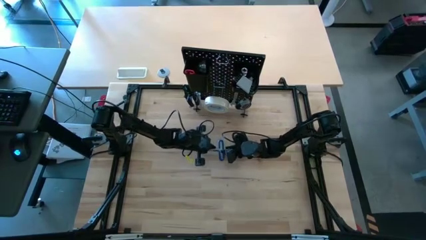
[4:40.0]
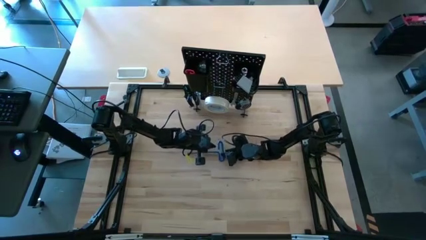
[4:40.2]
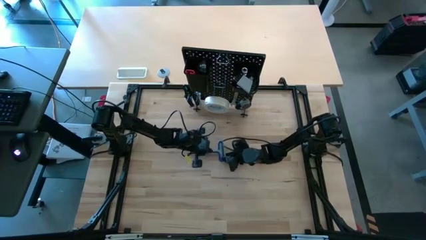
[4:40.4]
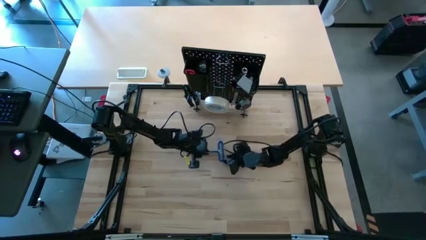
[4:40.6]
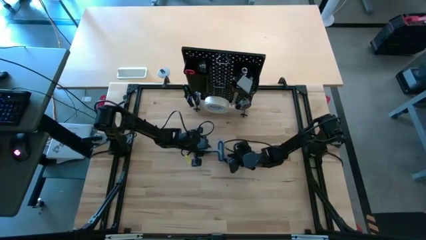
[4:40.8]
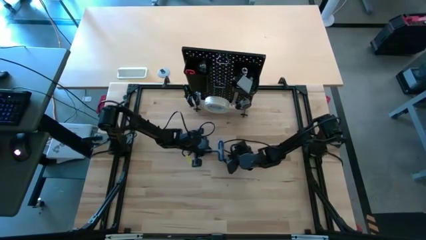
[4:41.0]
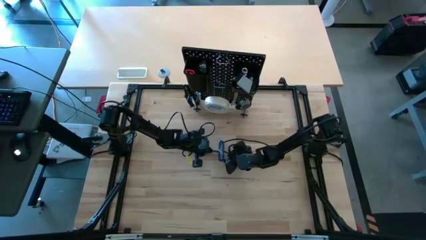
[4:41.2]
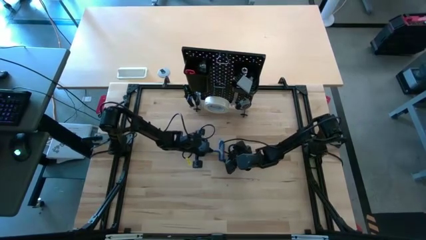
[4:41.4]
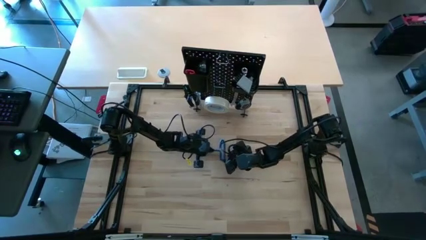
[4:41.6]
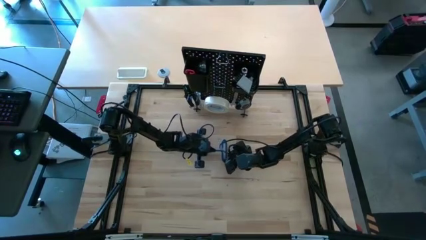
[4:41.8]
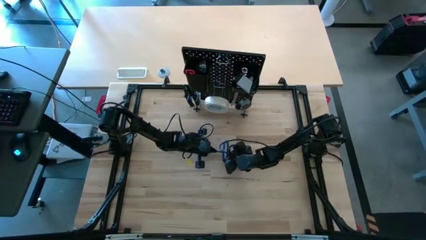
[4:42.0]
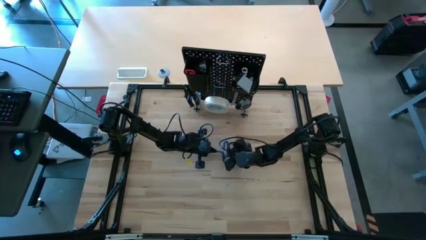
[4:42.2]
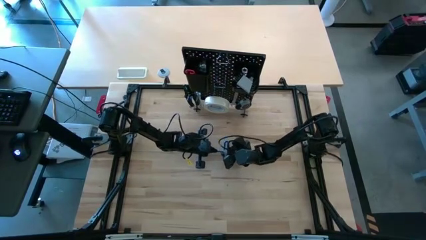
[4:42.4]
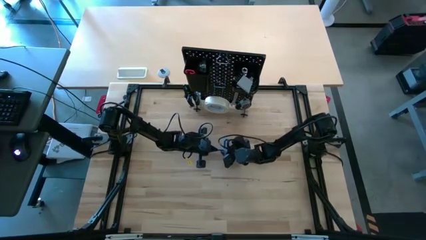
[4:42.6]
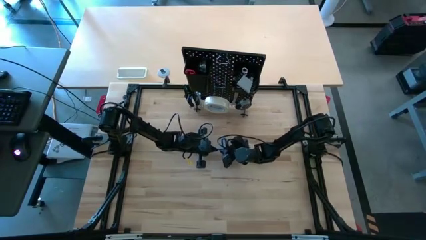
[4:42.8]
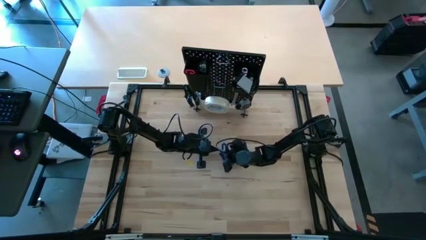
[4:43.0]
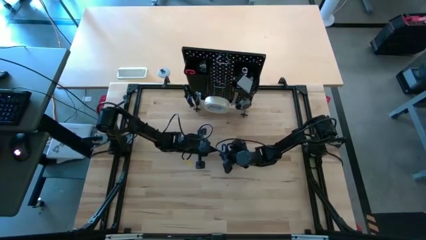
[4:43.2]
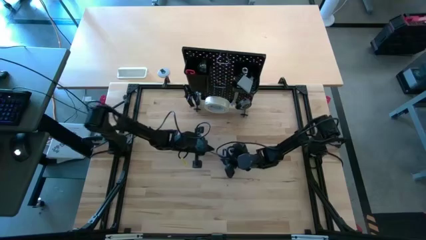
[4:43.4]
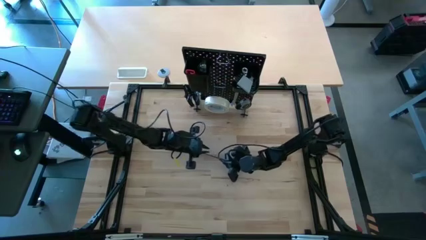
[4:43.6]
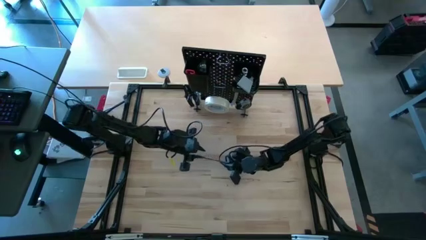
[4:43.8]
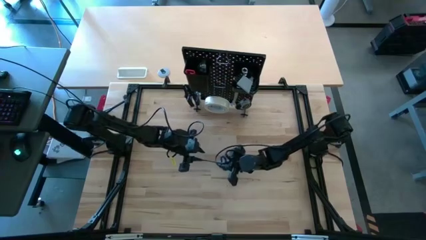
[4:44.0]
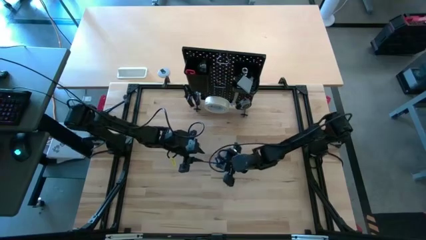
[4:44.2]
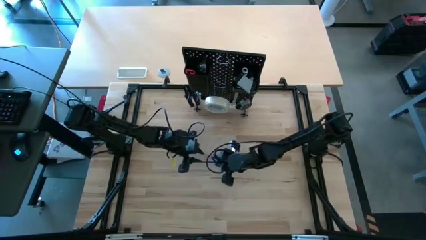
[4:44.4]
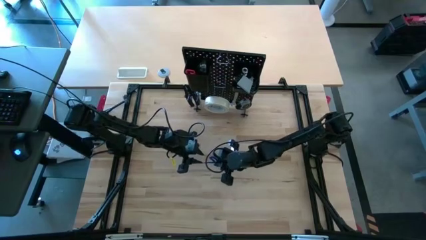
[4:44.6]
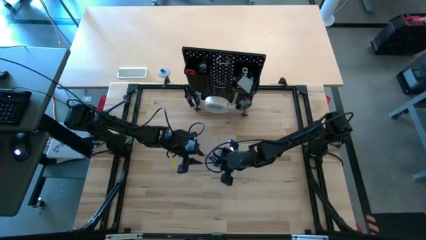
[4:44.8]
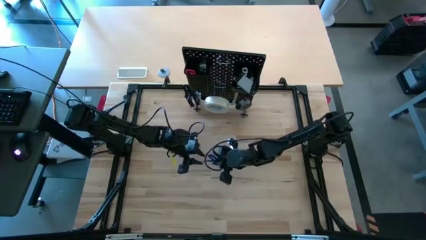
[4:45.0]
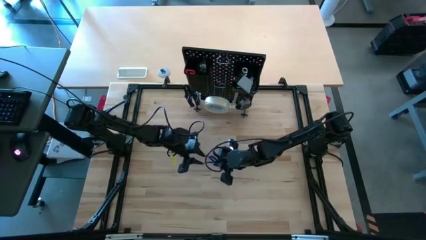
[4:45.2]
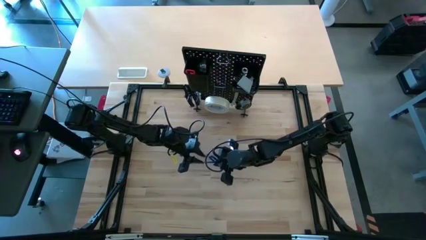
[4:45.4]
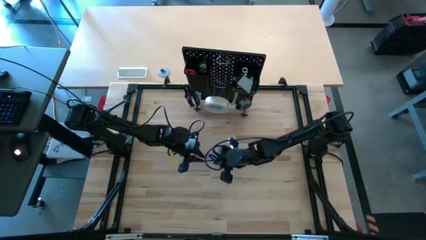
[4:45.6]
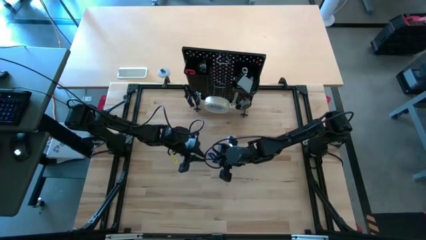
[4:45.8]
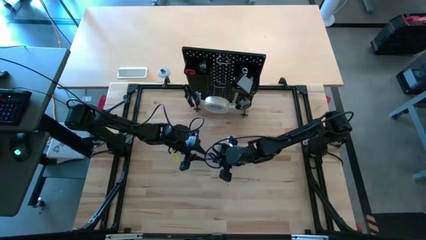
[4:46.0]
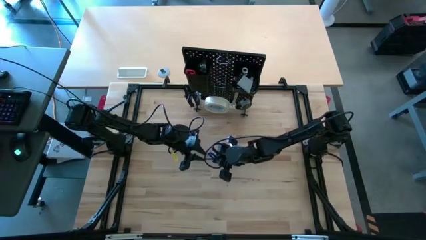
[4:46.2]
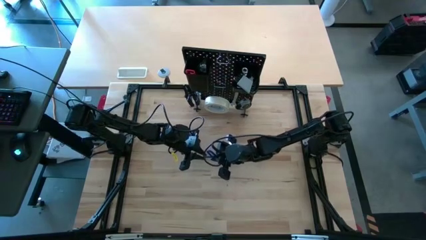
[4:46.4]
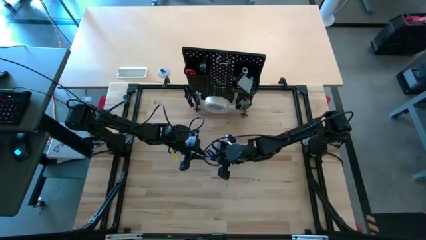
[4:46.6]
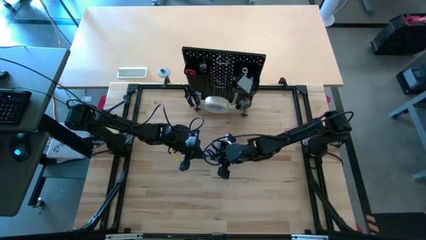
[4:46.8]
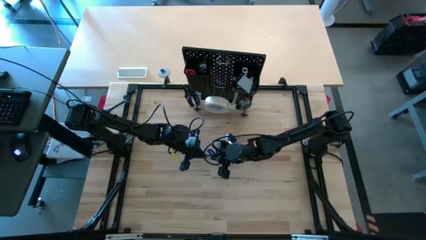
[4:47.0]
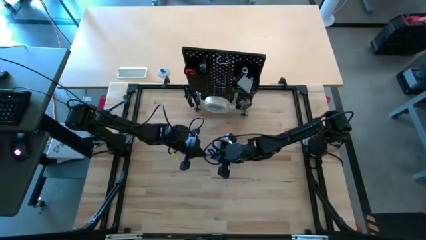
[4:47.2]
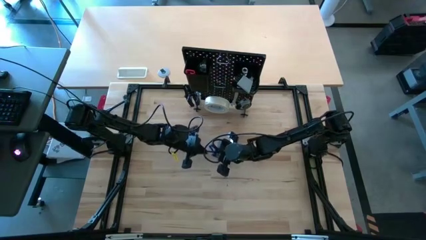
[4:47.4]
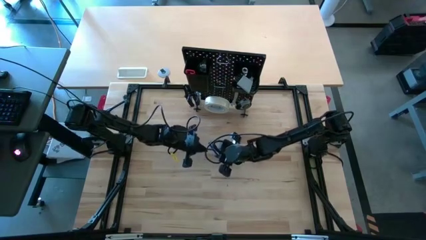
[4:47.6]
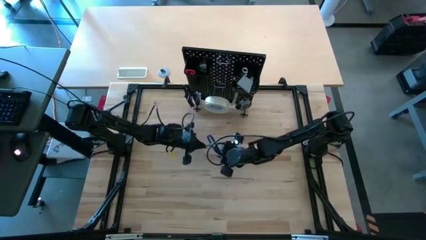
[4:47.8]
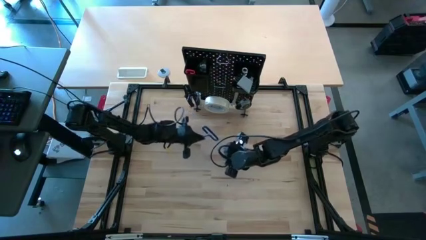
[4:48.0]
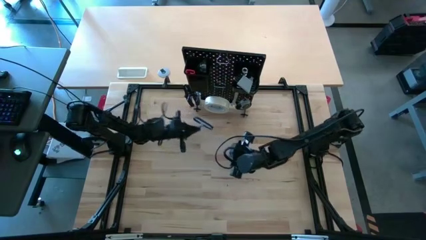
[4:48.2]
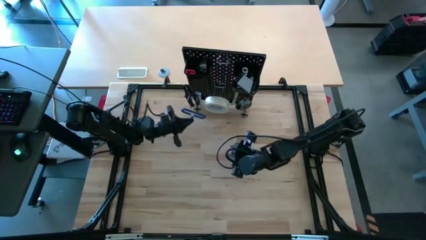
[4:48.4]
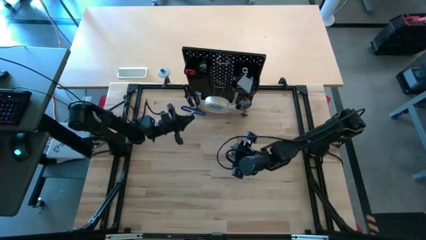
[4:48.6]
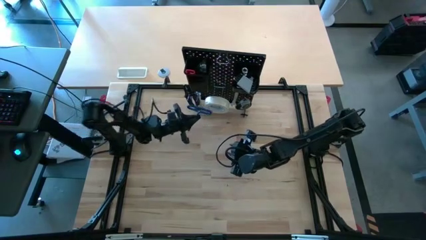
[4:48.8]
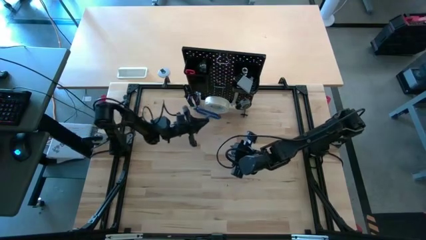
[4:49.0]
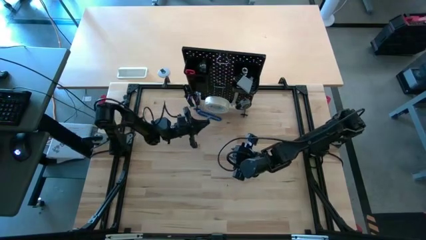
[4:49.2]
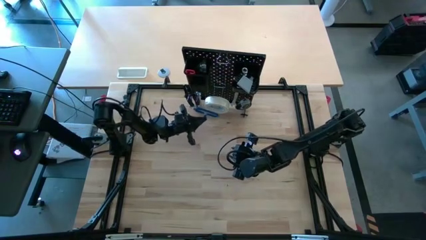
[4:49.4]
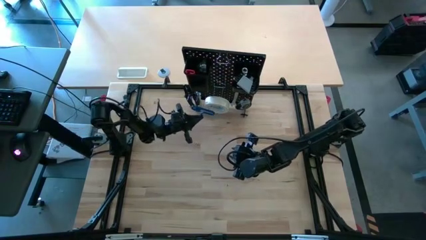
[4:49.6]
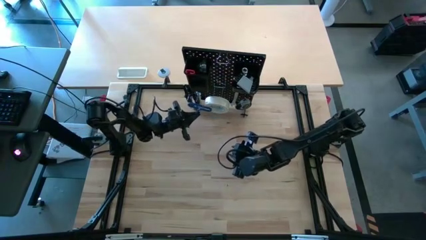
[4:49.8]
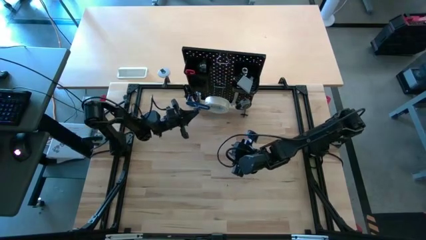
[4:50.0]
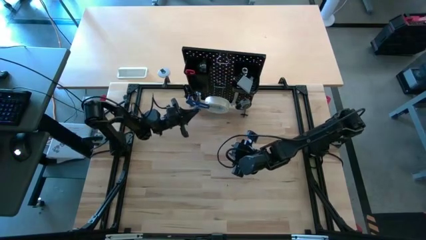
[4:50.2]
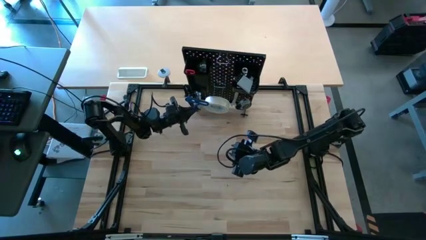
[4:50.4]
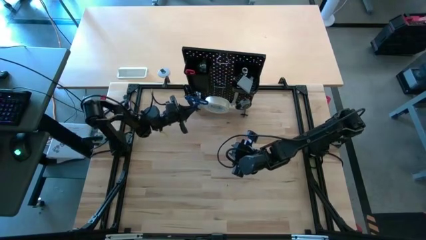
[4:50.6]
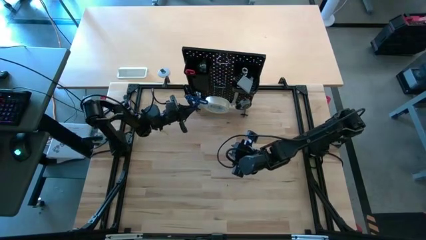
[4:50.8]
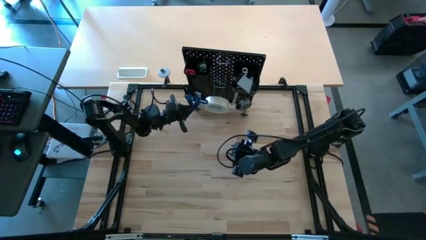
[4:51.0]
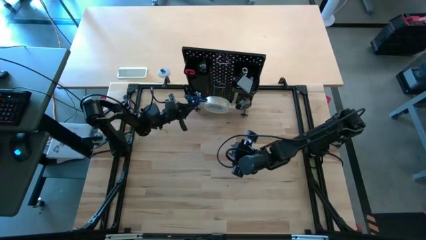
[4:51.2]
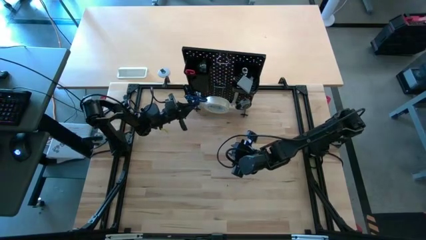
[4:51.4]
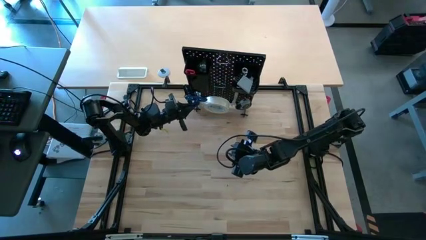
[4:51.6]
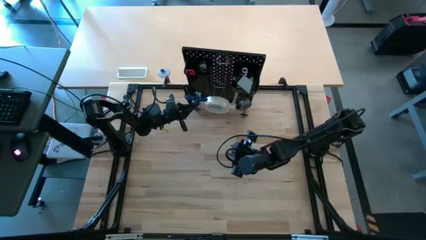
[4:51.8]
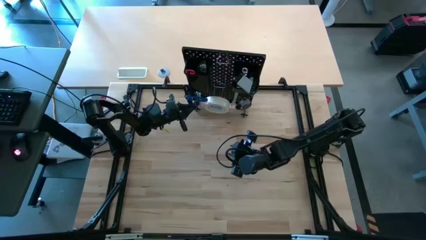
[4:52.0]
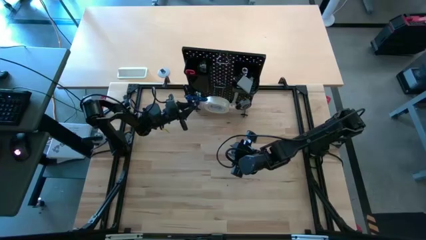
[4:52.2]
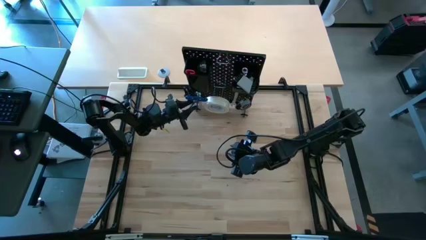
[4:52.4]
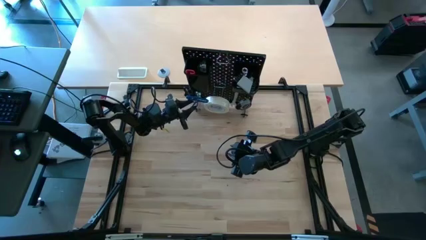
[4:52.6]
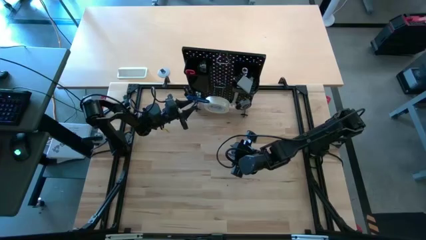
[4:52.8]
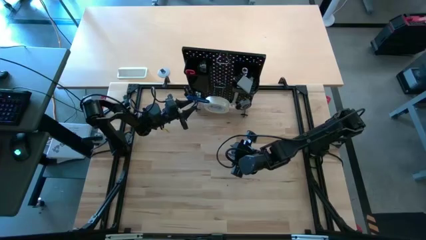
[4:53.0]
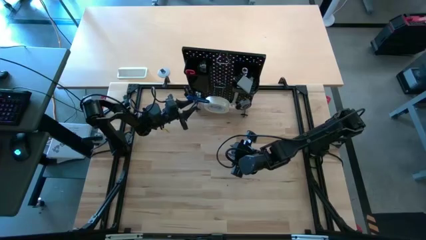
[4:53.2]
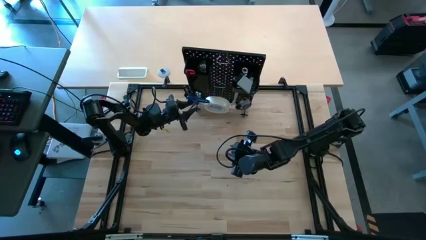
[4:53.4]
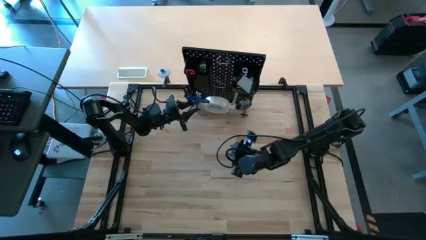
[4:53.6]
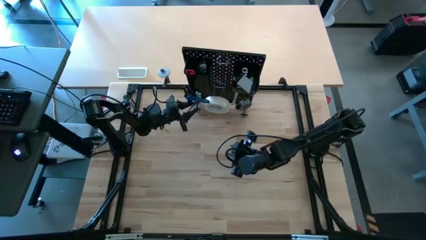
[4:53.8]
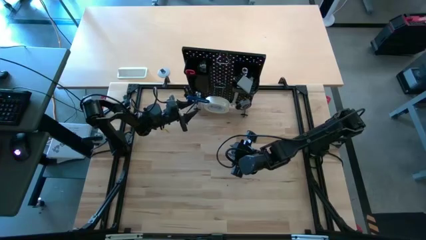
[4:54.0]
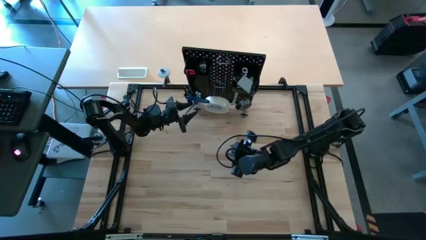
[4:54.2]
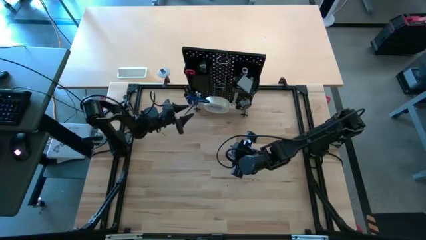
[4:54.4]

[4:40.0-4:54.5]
Task: Hang tools onto peg board
Hang the blue allen wrench on the pegboard

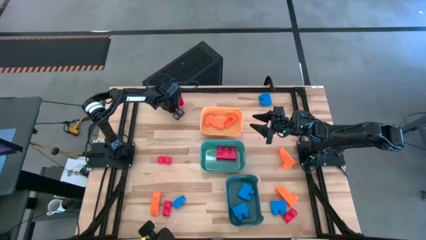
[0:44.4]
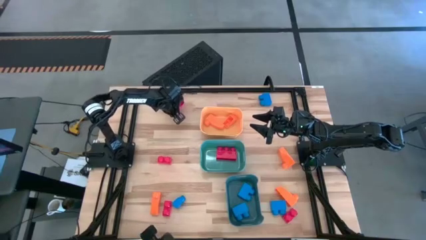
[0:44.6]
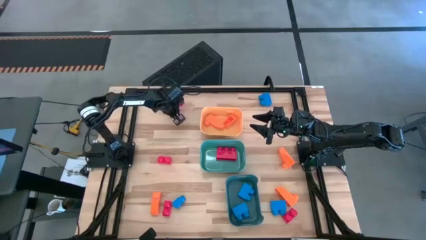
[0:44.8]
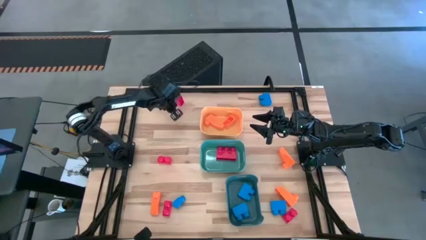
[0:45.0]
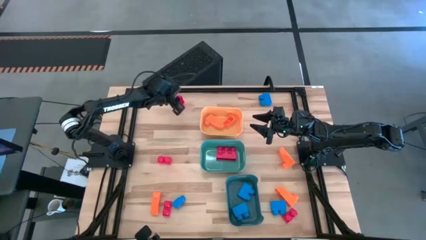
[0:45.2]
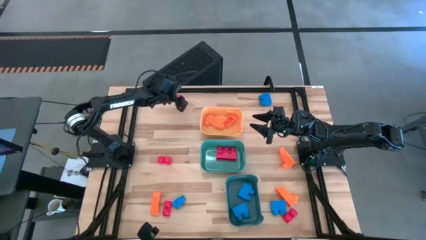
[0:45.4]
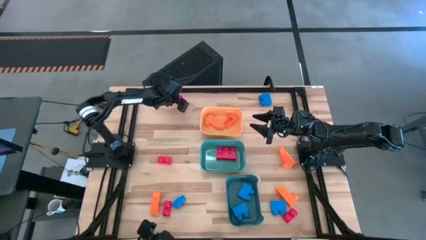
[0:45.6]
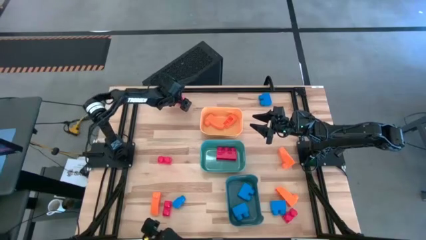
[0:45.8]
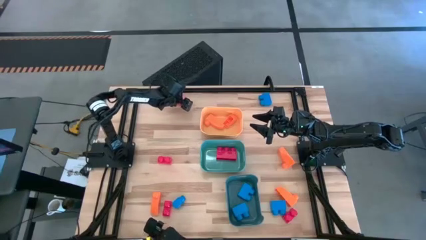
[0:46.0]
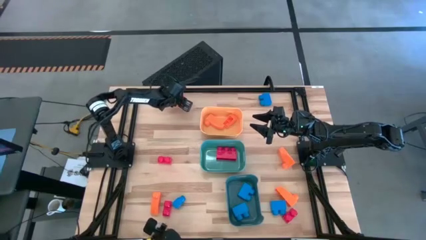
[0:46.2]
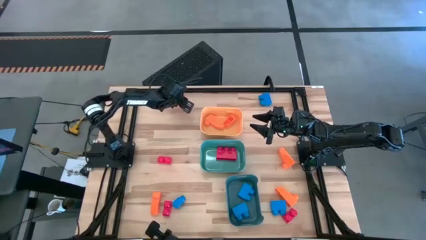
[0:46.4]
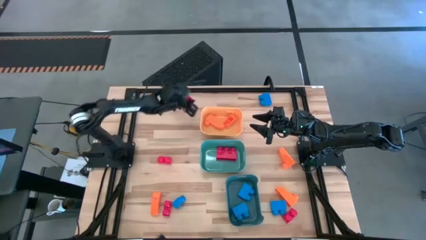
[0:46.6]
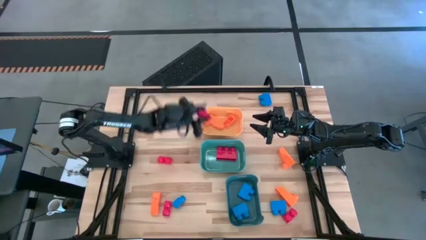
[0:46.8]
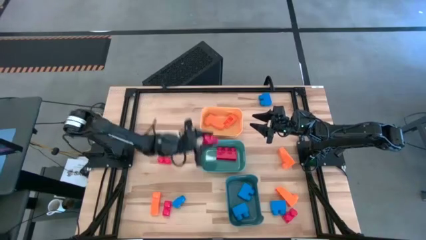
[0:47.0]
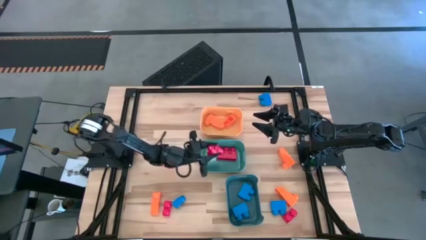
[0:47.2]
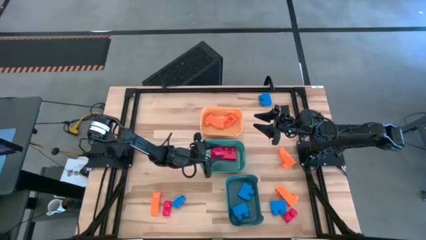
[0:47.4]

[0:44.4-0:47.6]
Task: Sort & place blocks by color
Put the red game piece into the green bin
